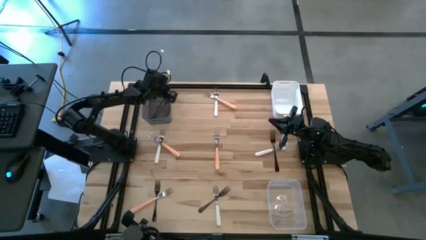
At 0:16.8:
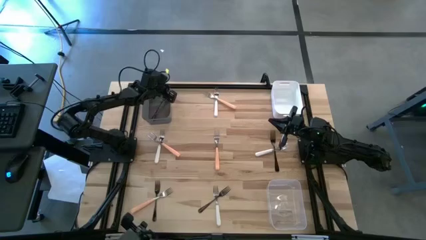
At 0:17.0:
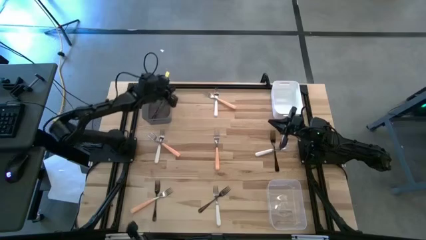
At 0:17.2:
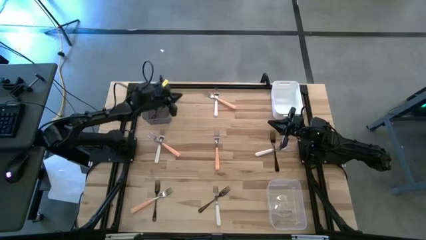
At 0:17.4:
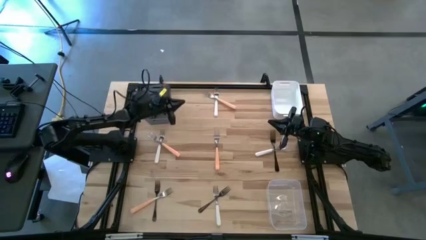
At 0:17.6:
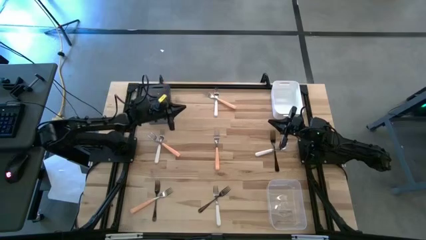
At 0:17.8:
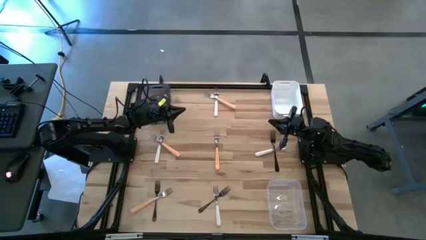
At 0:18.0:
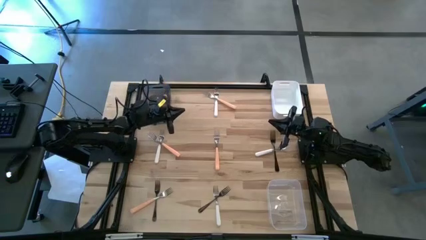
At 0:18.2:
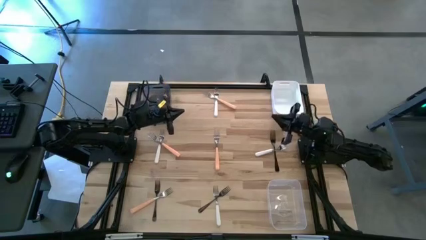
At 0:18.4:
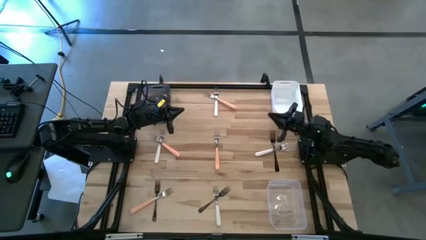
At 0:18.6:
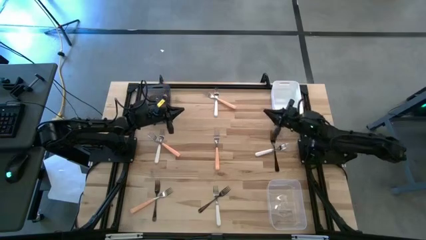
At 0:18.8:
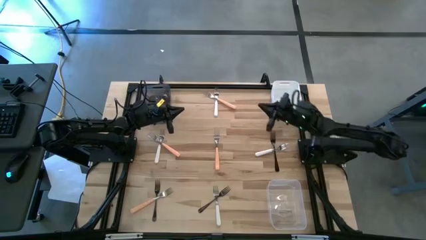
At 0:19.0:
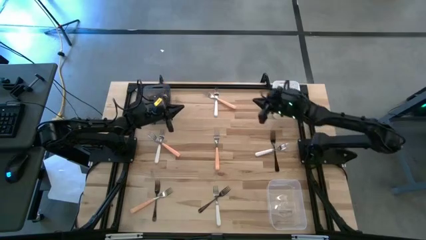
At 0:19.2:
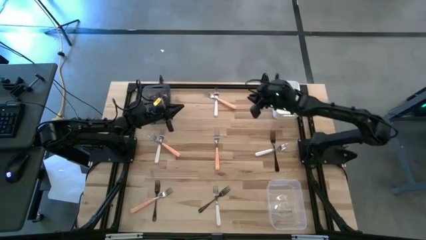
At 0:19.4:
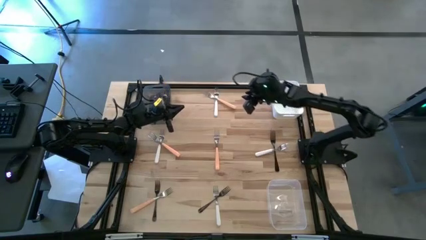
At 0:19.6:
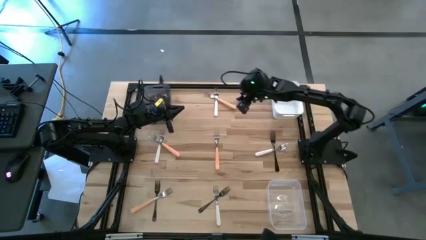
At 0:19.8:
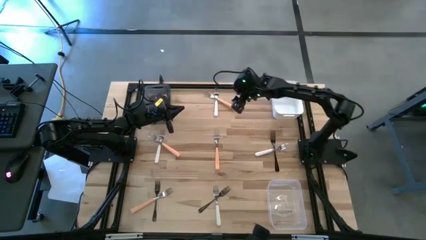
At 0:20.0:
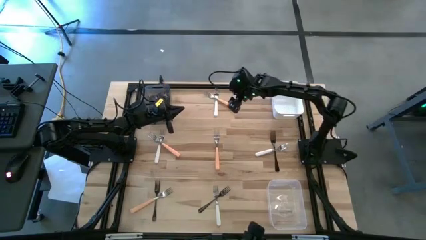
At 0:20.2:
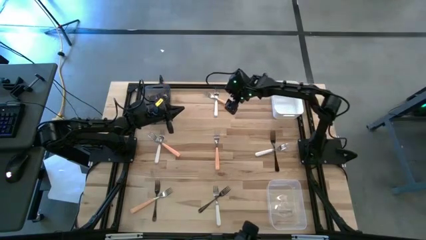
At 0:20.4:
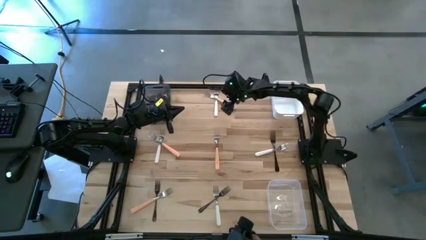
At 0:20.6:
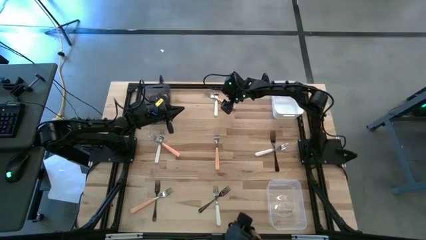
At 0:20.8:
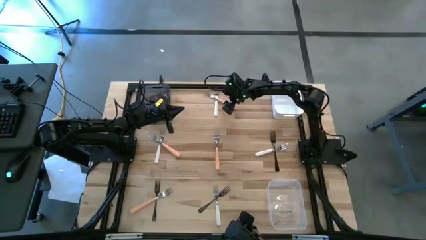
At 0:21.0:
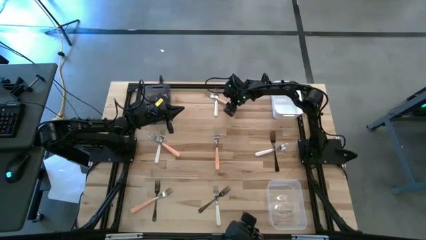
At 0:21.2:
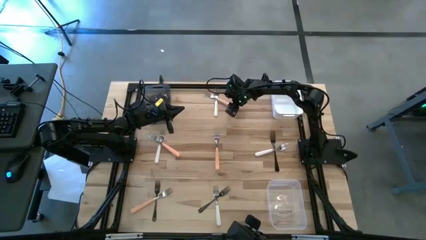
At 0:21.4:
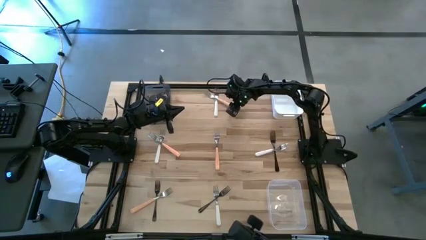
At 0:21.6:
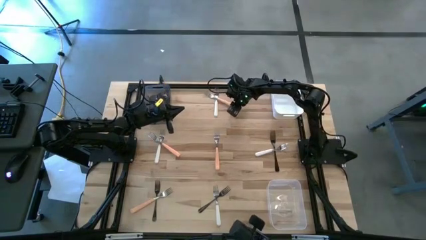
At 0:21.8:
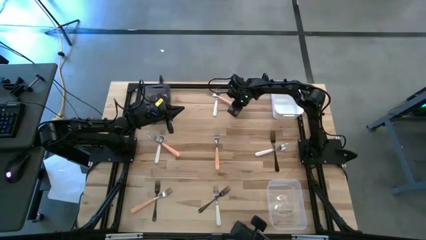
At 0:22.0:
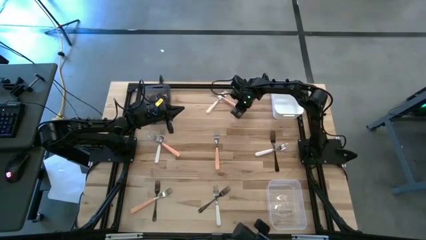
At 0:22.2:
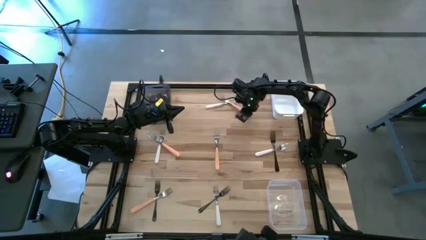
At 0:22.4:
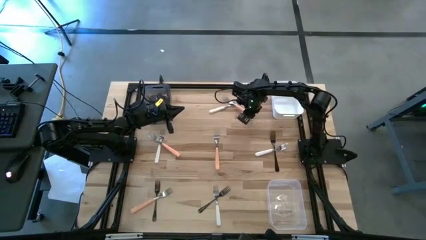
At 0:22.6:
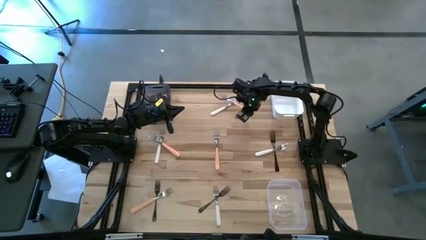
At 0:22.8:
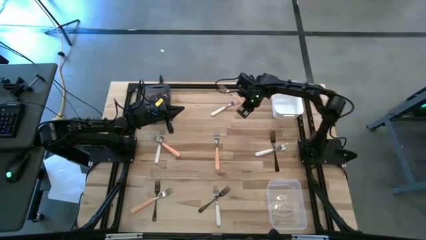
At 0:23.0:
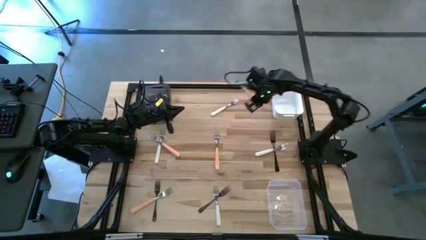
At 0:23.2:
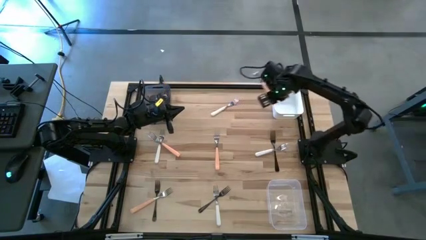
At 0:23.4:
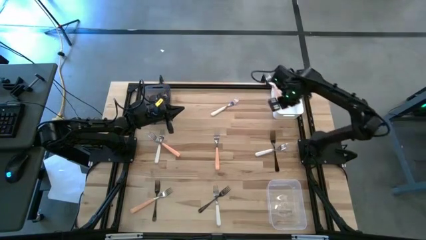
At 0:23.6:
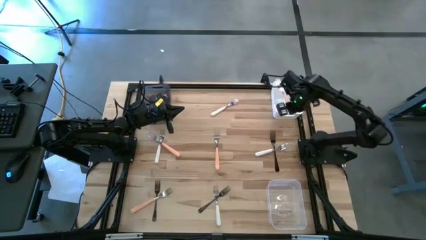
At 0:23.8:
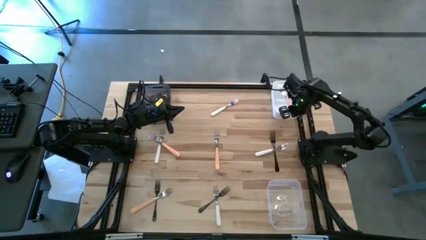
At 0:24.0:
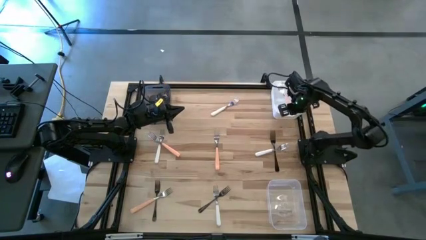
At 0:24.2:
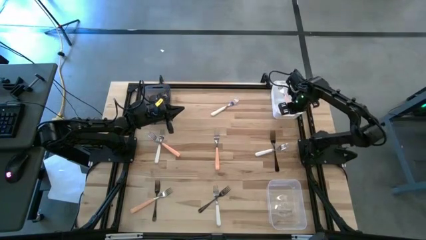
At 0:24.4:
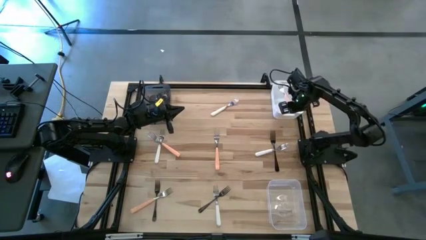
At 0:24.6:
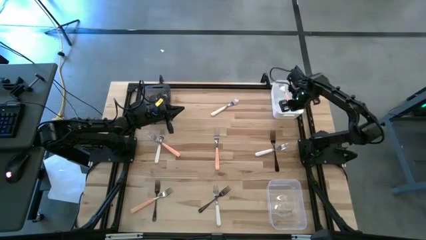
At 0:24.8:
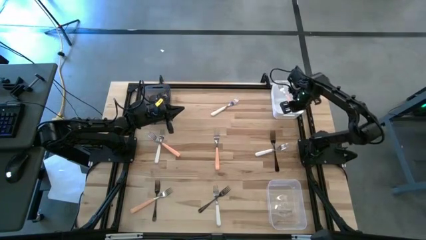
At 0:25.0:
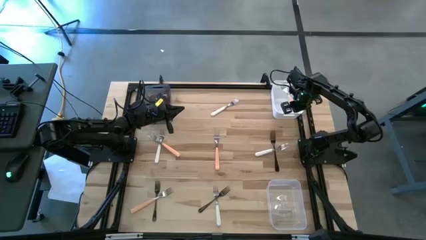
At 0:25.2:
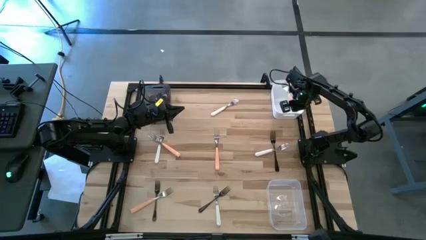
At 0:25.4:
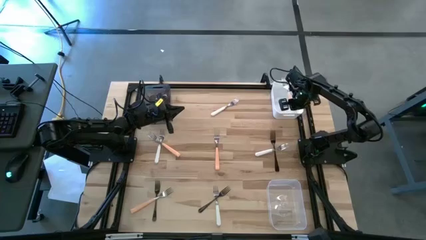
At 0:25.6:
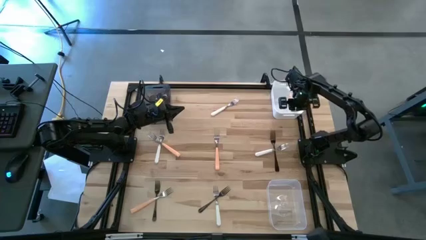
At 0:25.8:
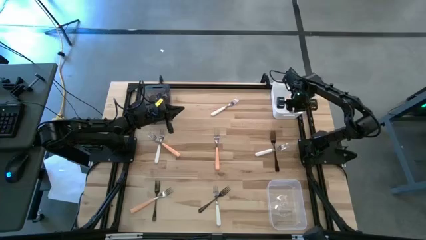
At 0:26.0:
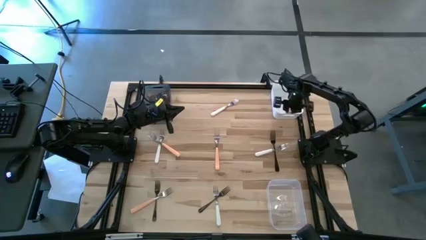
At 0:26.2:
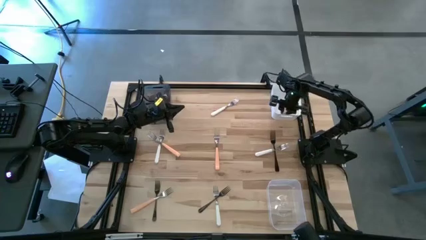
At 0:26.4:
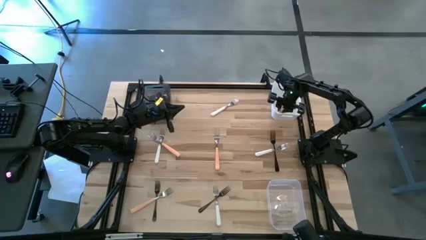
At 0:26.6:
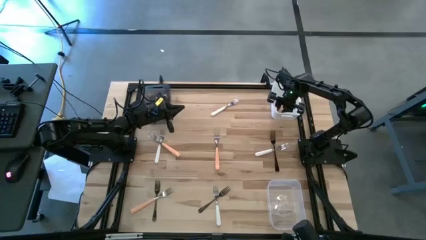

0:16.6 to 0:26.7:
Task: Sort silverware by color (type)
Put the top orange fork into the white bin

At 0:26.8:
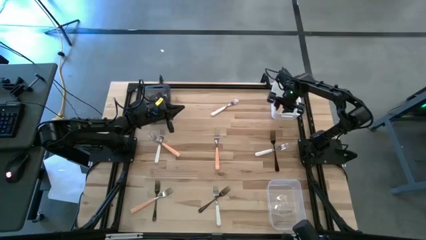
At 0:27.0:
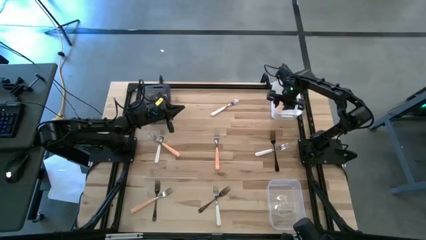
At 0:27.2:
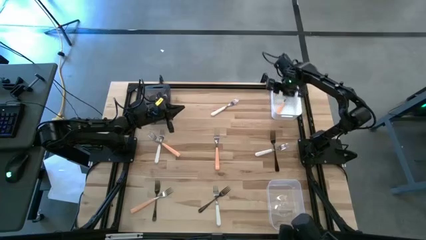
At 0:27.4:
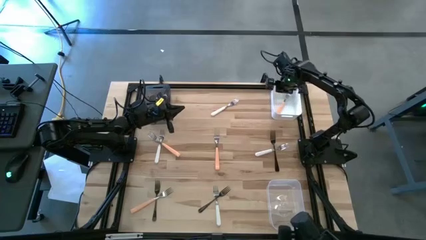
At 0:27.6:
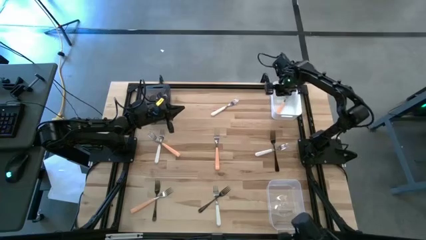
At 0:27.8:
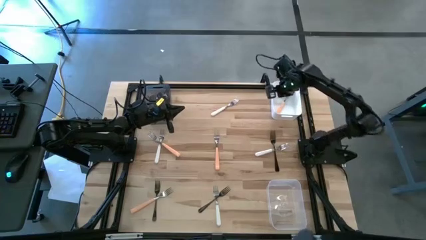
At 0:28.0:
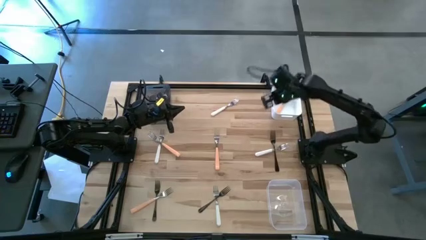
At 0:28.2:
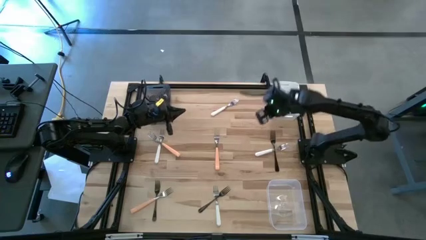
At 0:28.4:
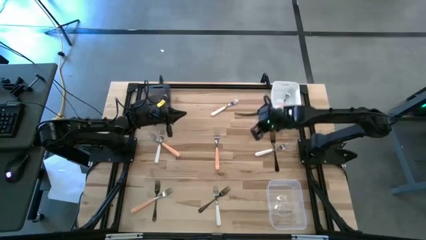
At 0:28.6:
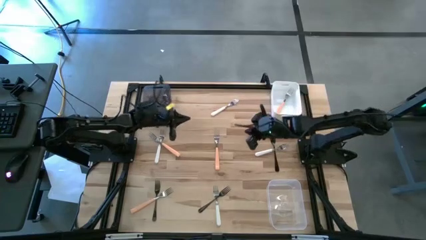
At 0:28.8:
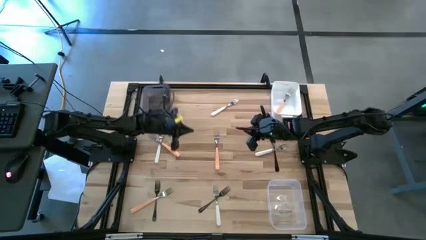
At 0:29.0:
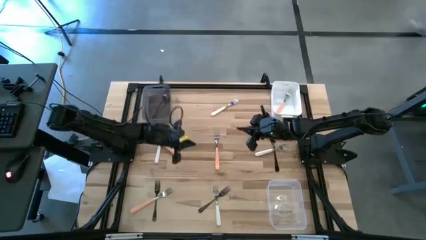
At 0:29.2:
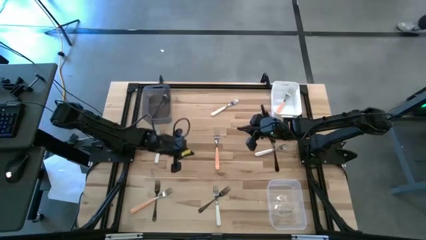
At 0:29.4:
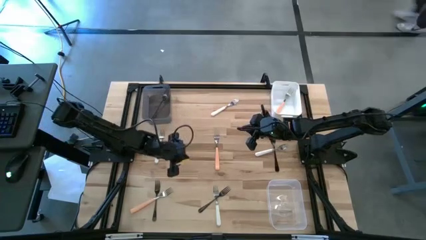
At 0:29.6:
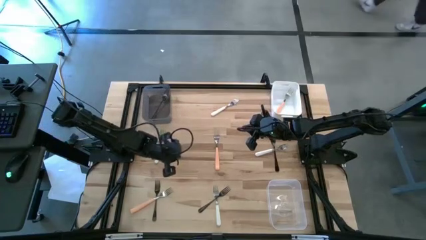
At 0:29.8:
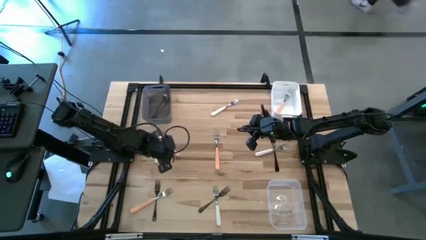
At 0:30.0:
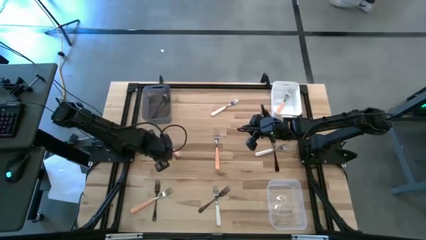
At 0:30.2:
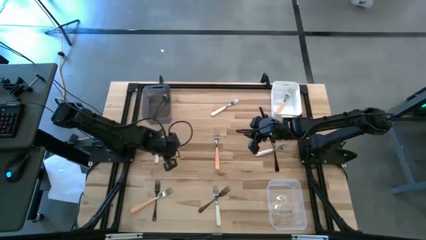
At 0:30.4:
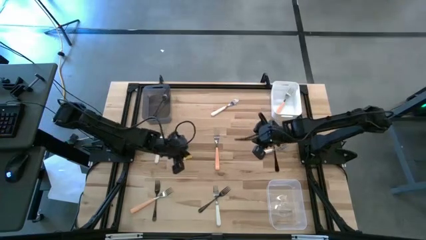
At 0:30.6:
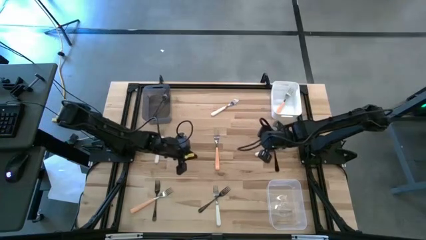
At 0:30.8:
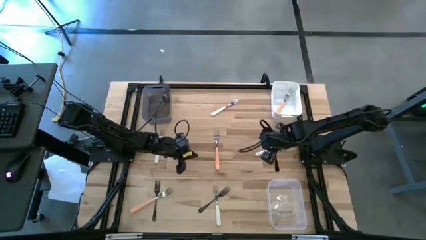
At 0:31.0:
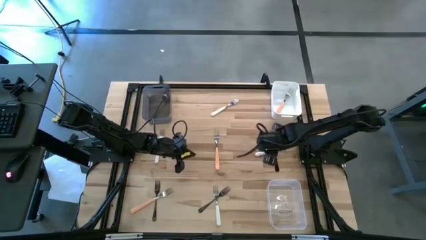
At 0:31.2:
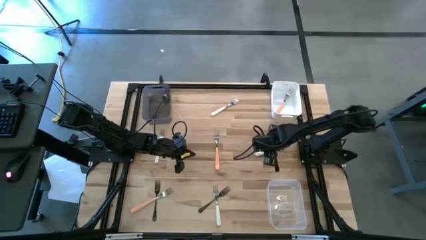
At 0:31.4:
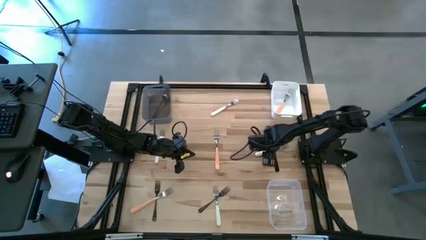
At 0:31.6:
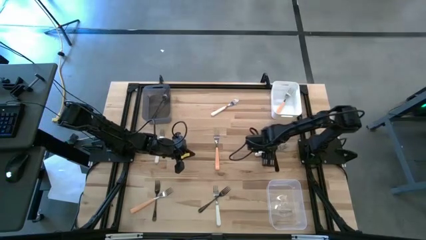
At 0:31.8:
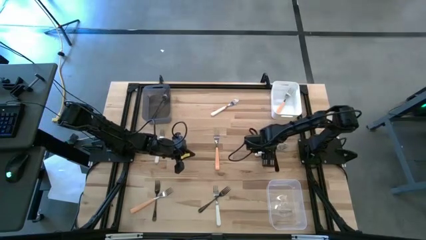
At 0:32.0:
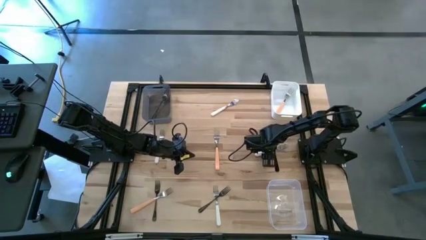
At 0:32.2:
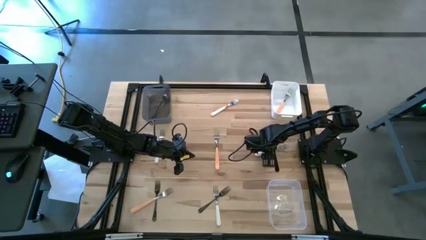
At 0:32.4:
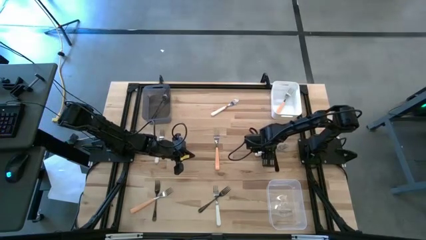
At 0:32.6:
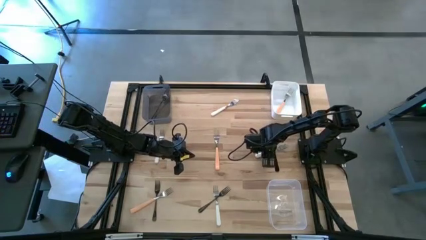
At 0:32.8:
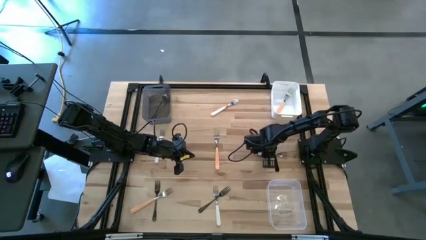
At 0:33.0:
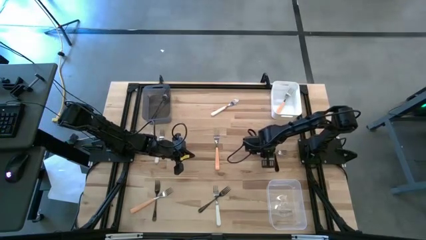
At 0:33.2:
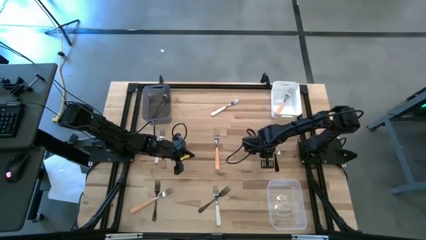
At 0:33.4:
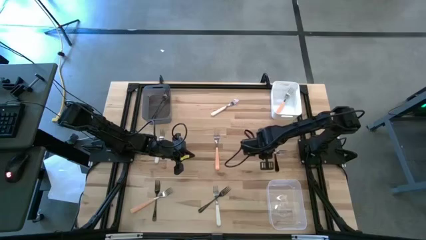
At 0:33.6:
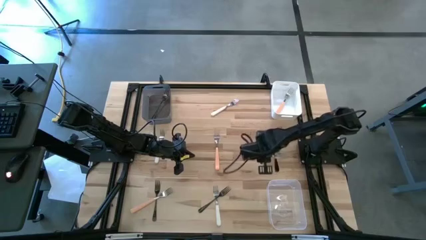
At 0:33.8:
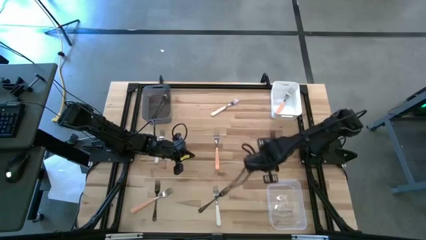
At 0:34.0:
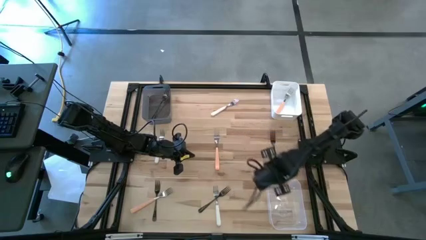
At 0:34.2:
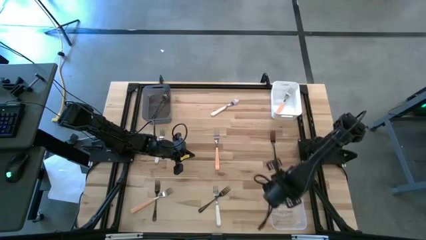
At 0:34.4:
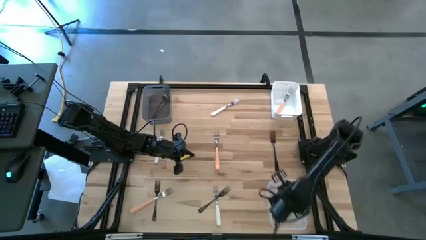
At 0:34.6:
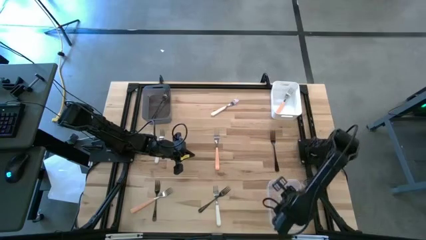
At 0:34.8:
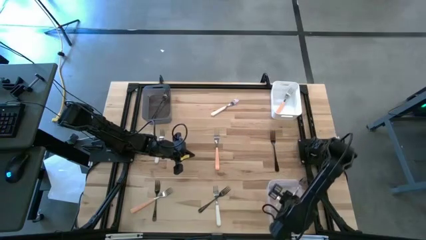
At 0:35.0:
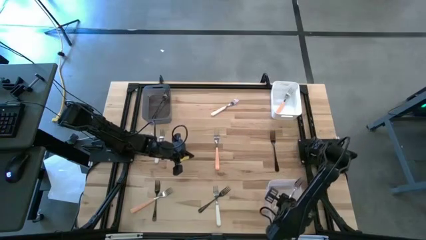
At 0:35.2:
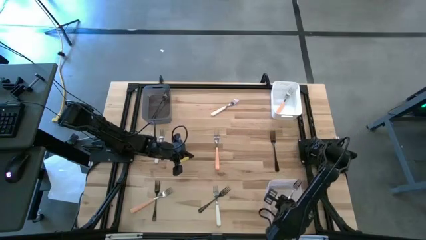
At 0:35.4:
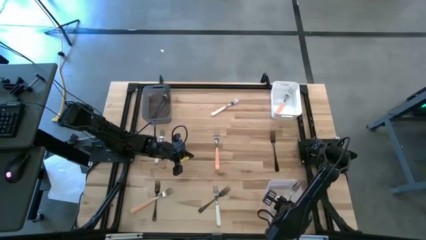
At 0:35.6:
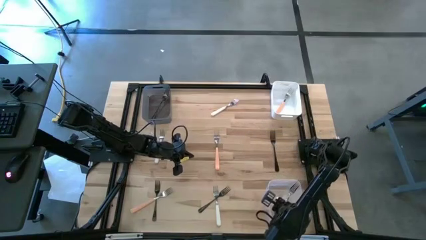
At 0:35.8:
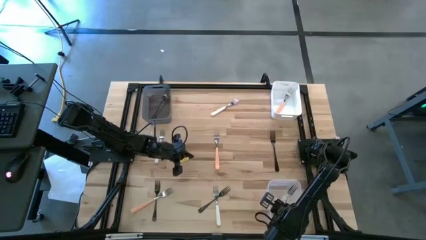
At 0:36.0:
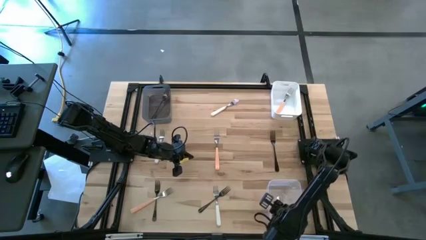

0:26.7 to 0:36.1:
Put the middle right white fork into the transparent bin
